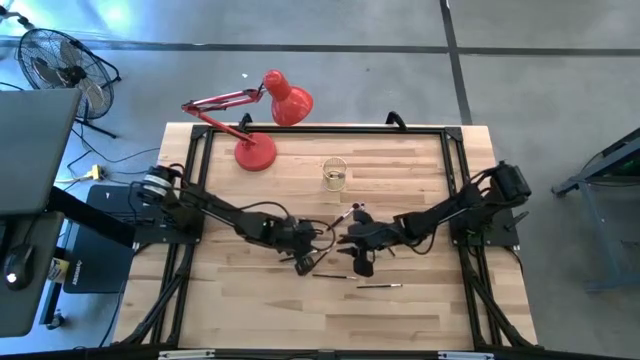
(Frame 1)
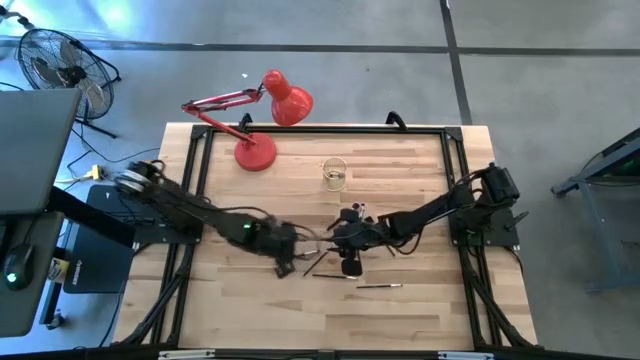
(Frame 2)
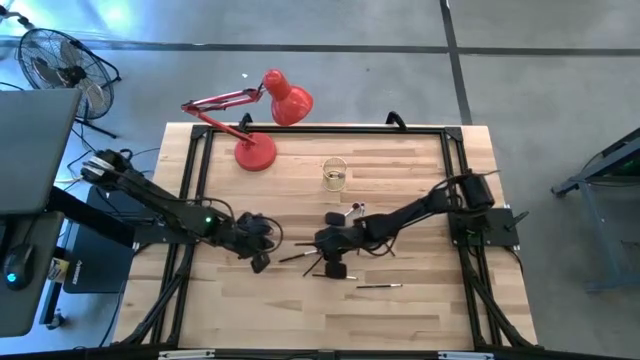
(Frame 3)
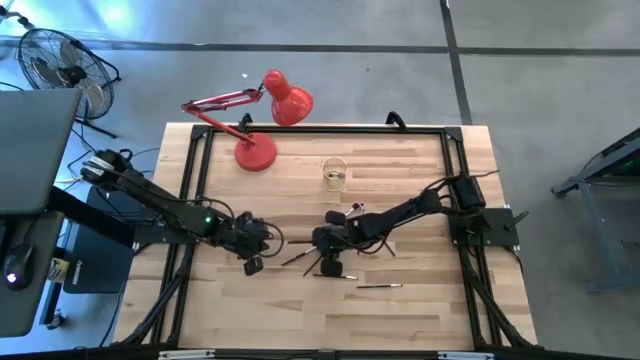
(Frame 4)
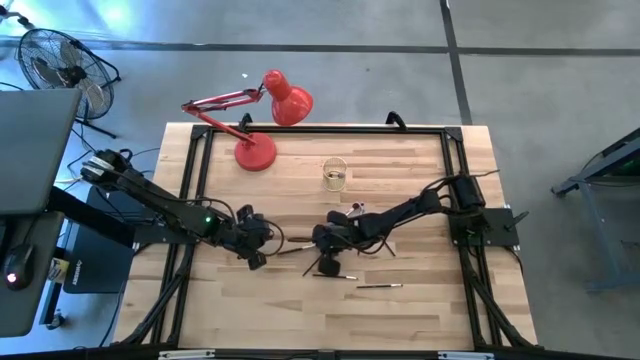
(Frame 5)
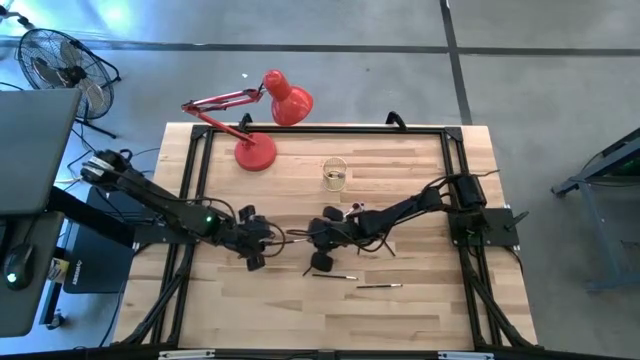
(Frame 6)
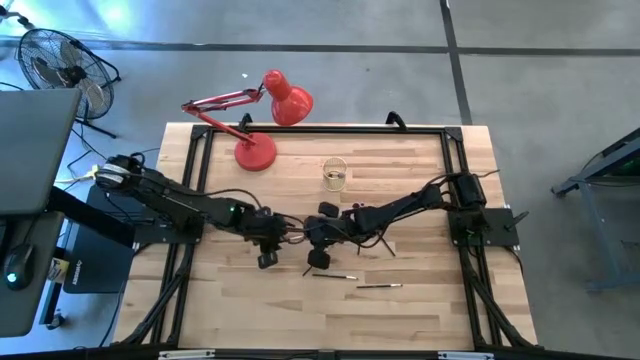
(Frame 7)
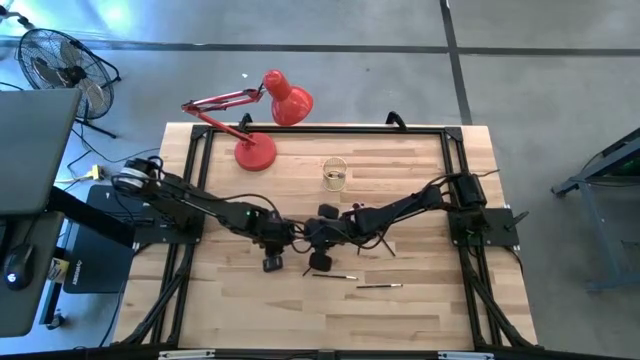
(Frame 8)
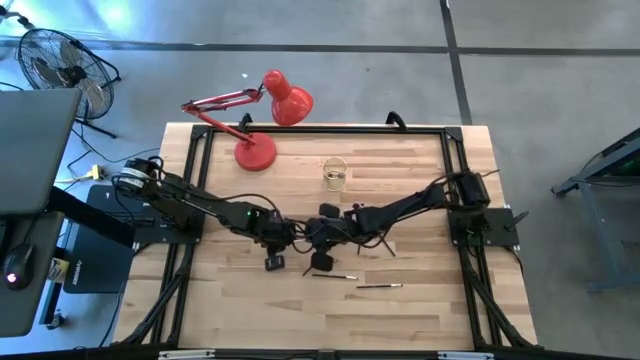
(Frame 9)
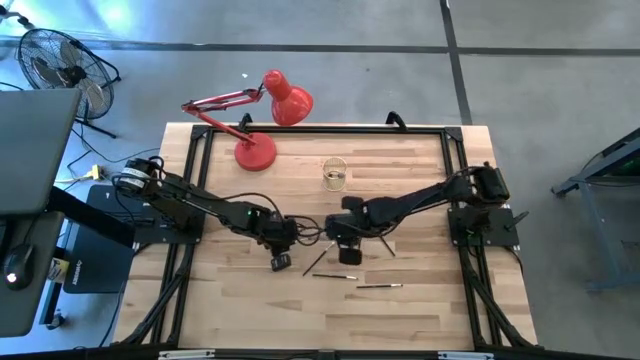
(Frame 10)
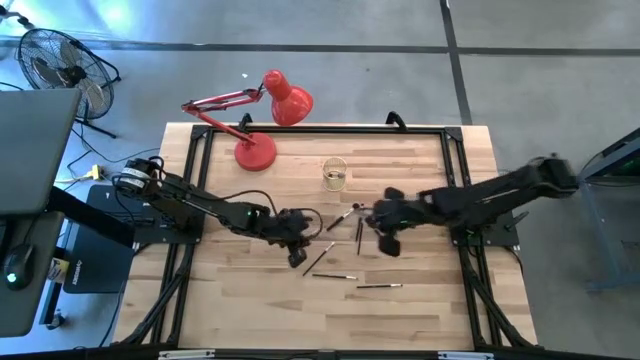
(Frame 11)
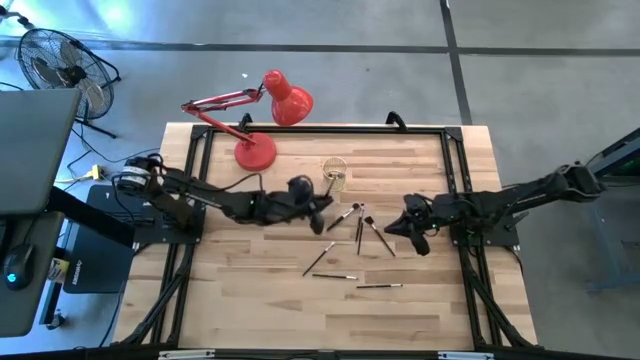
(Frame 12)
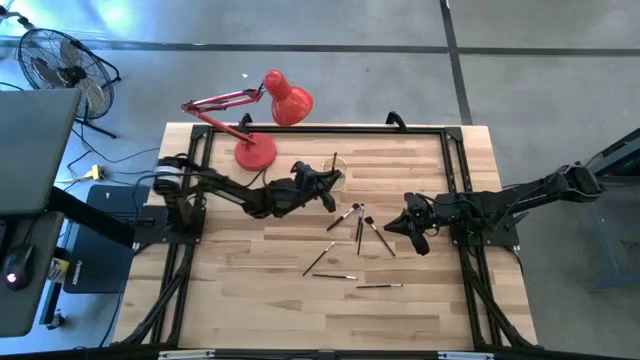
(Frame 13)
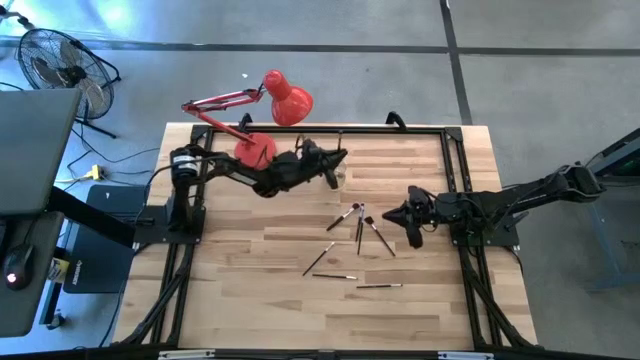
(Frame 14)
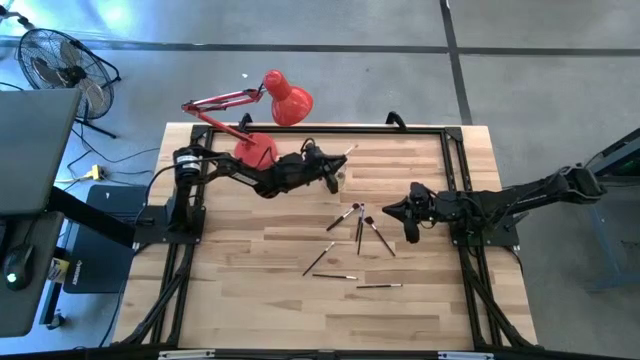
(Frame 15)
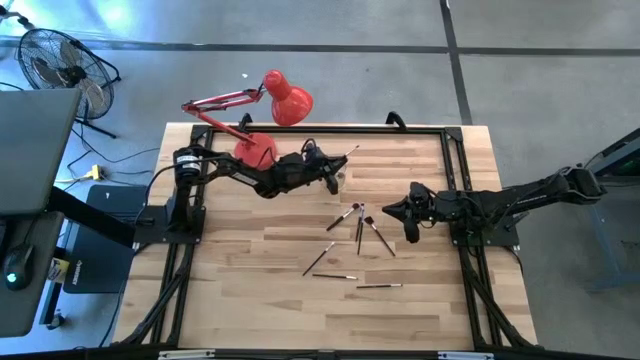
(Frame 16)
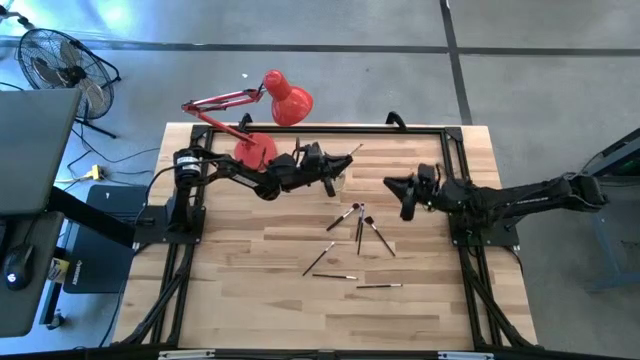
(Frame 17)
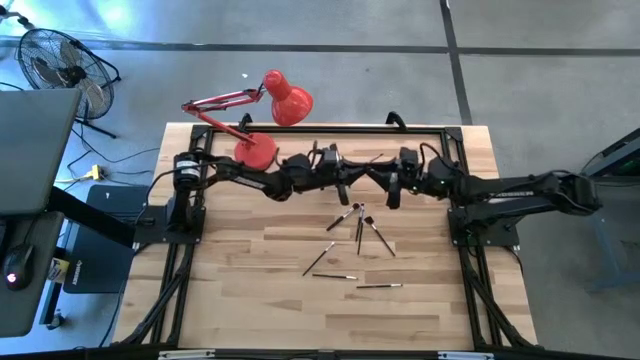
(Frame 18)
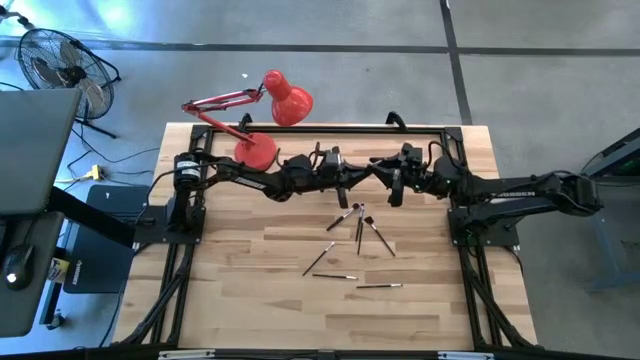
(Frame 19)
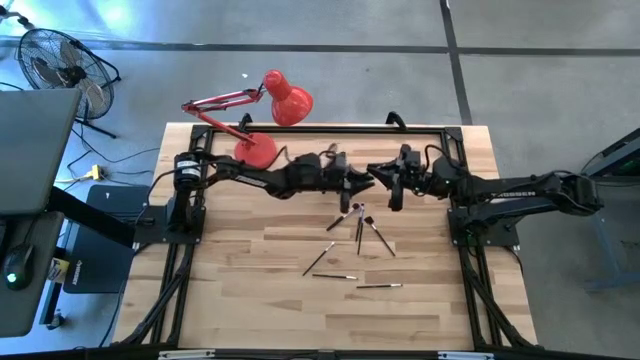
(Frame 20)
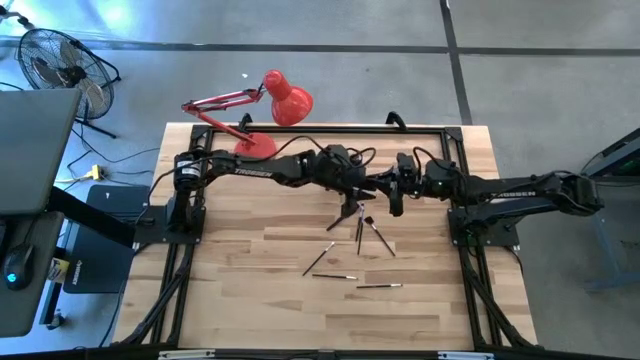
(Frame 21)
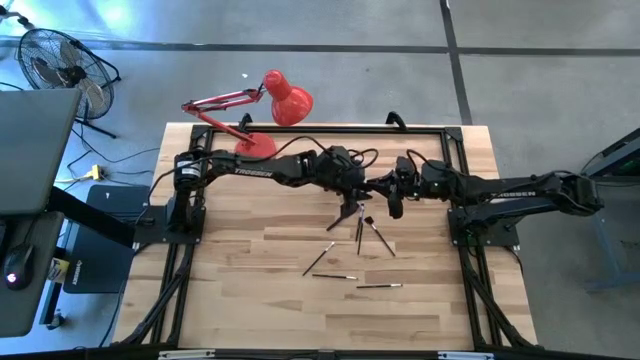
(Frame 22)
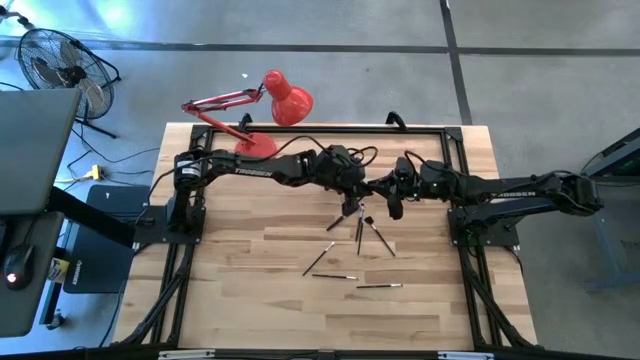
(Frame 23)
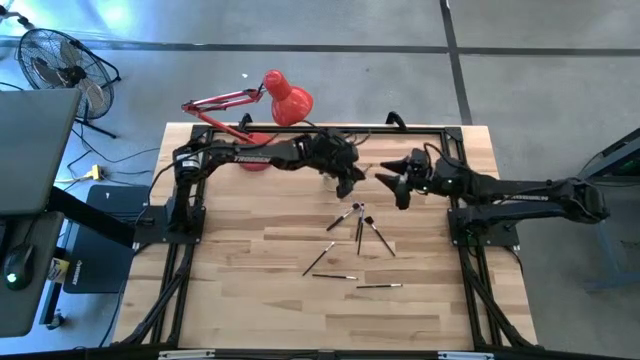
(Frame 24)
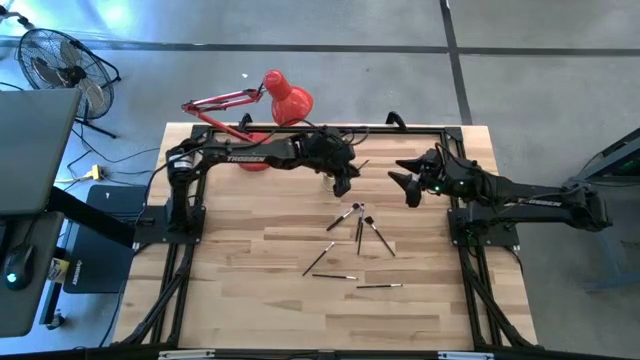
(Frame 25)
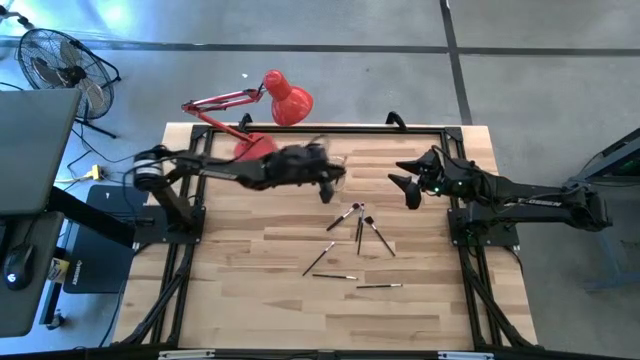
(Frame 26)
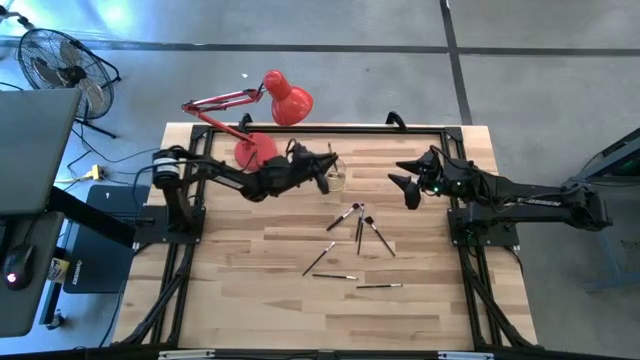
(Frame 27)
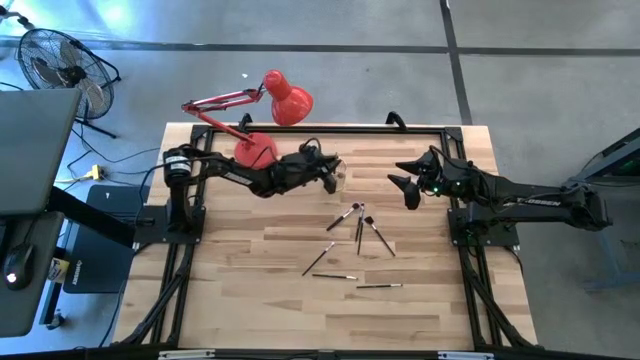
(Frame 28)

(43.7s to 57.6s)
Task: Put items in baskets/containers
Put the makeup brush into the wire bin

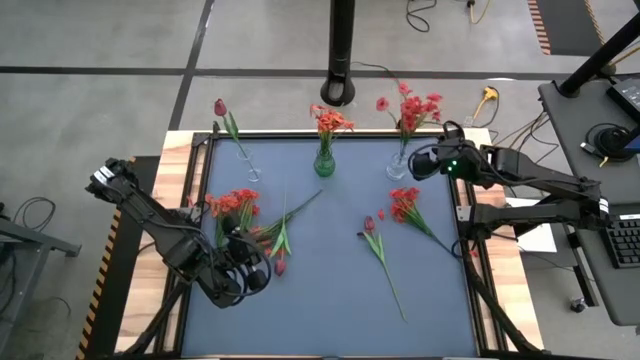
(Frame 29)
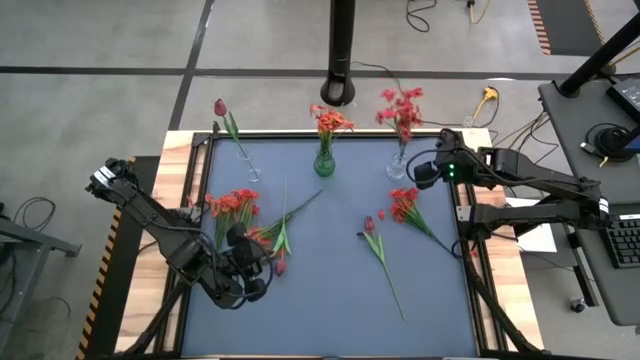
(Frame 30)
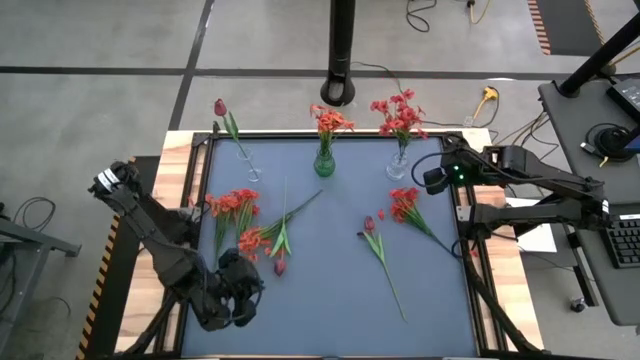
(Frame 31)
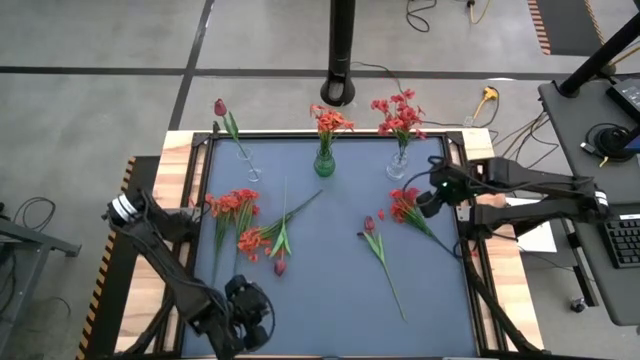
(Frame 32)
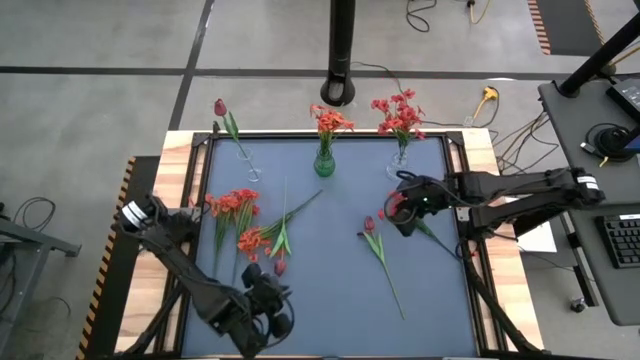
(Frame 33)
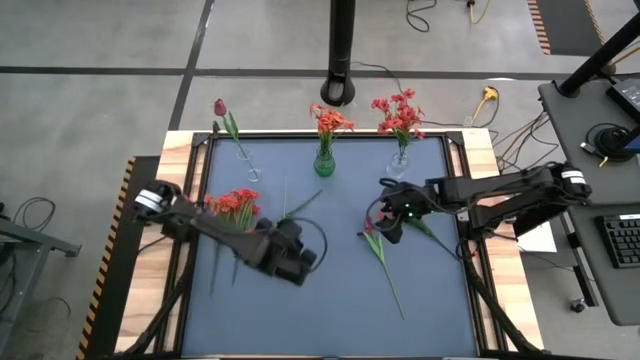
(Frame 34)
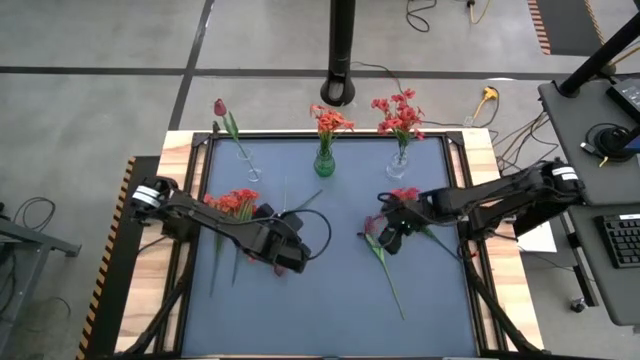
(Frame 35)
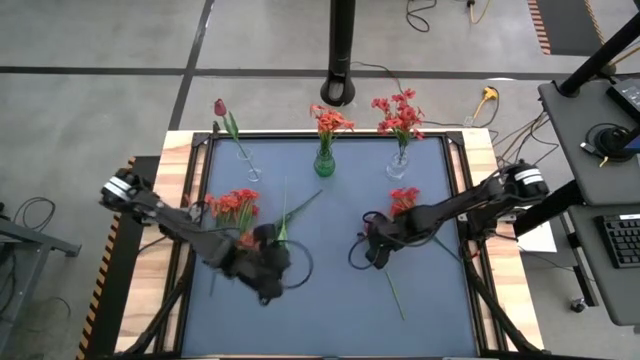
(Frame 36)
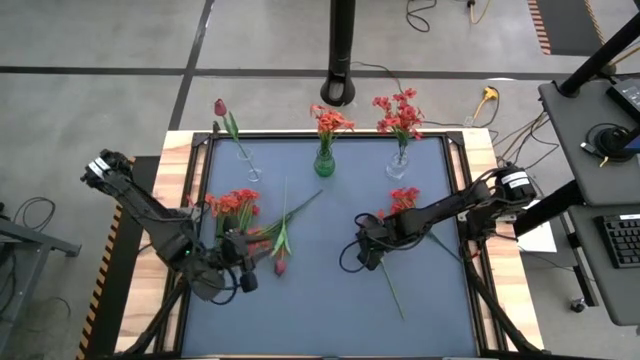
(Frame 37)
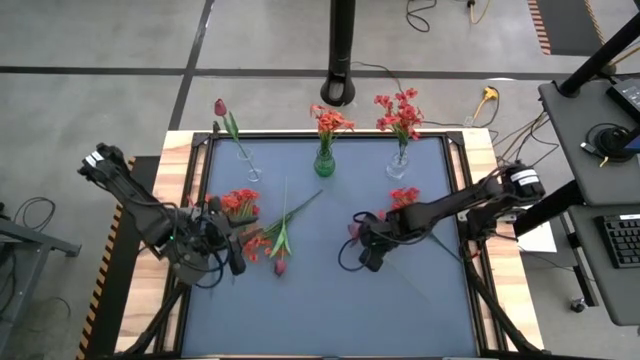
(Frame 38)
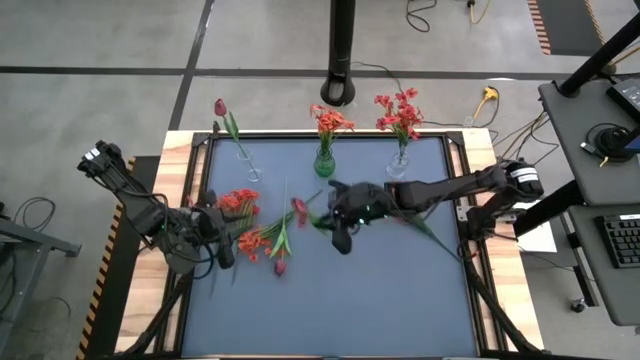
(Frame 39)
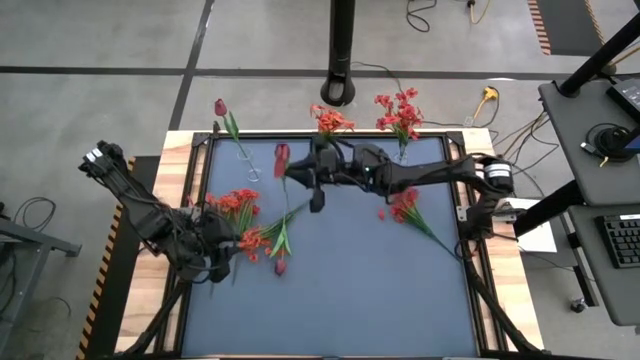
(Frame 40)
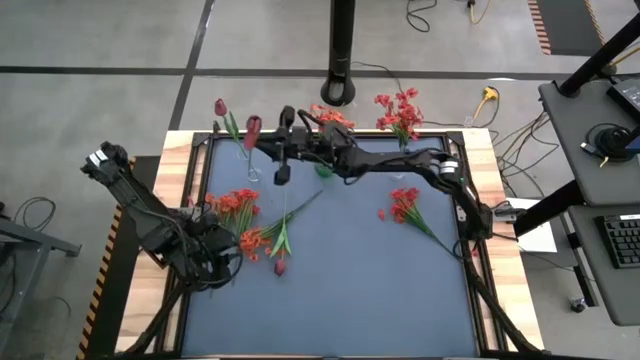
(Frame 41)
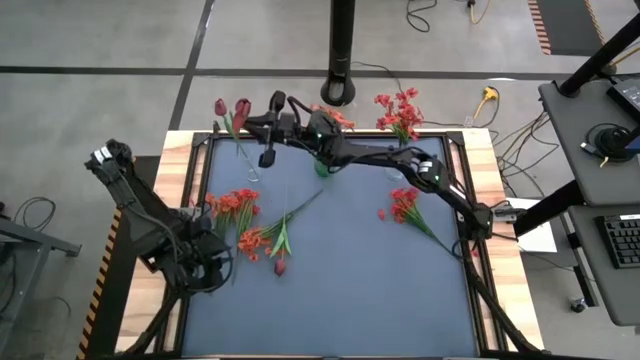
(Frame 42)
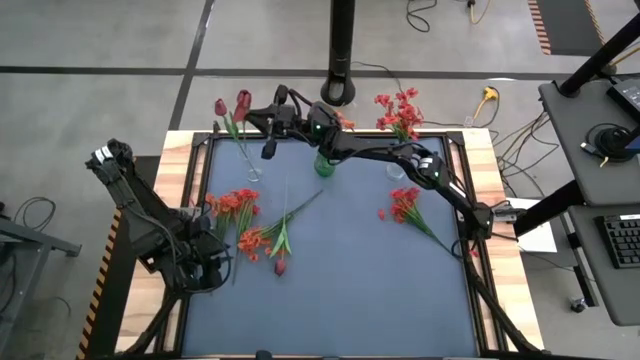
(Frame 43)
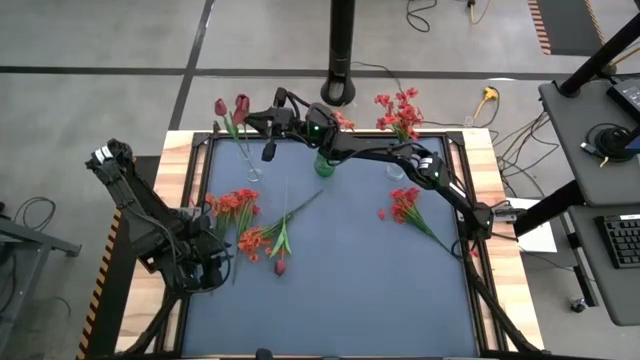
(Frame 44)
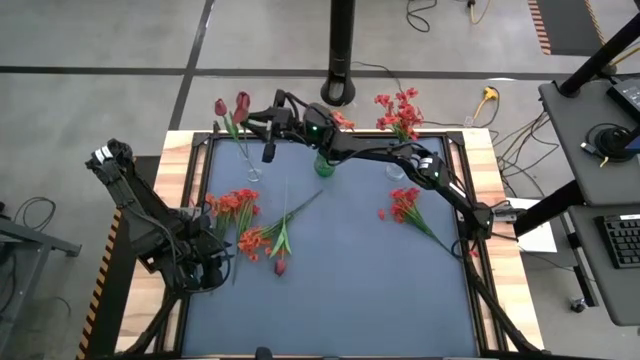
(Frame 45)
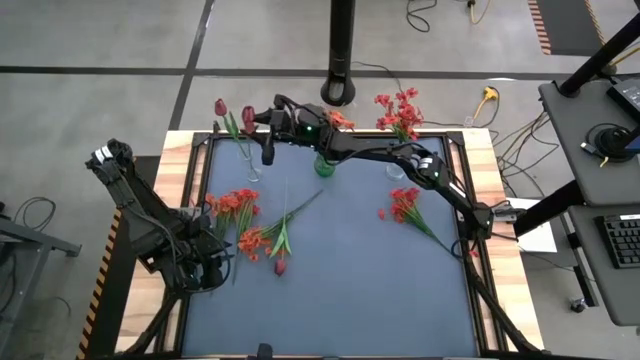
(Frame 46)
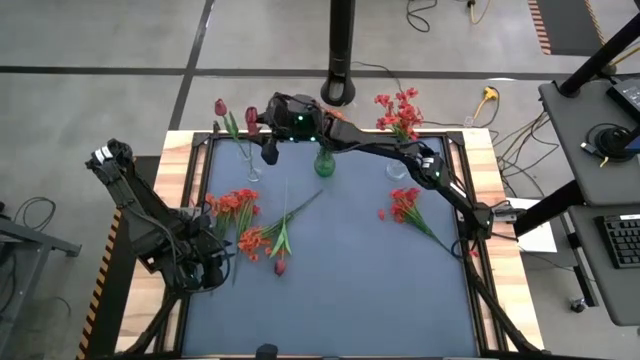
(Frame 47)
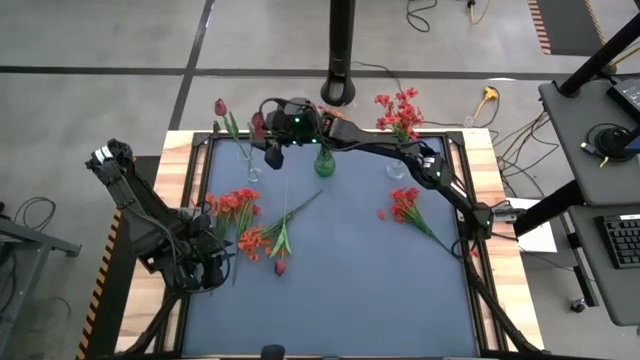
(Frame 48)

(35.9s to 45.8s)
Task: Sort flowers into vase by color
Put the right red tulip into the left transparent vase
